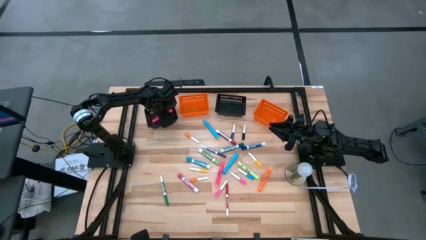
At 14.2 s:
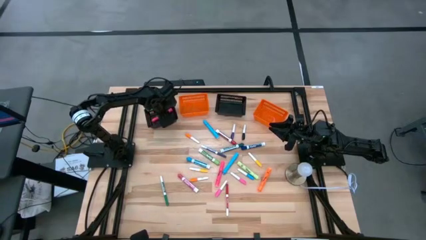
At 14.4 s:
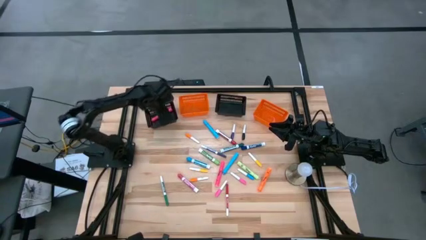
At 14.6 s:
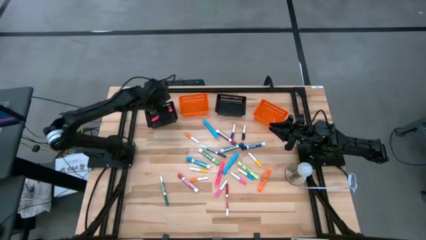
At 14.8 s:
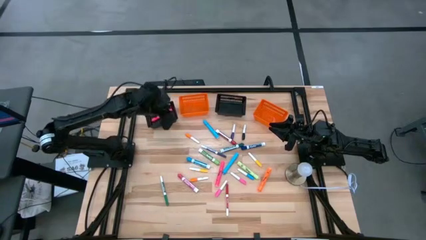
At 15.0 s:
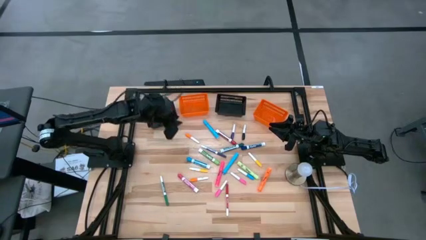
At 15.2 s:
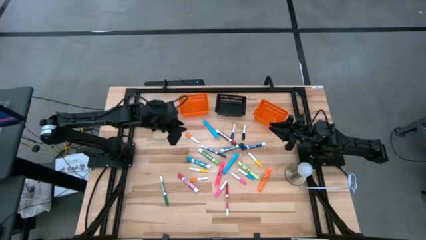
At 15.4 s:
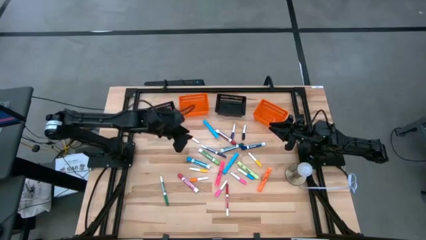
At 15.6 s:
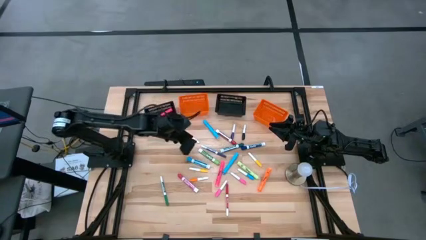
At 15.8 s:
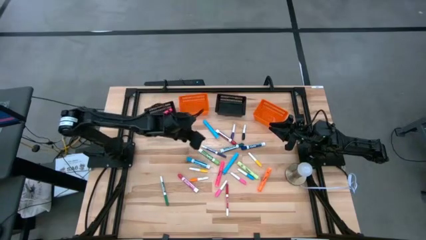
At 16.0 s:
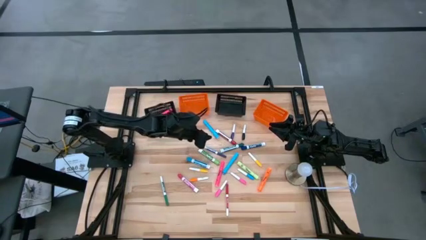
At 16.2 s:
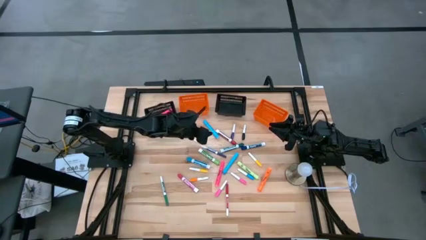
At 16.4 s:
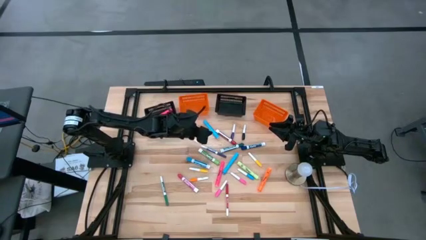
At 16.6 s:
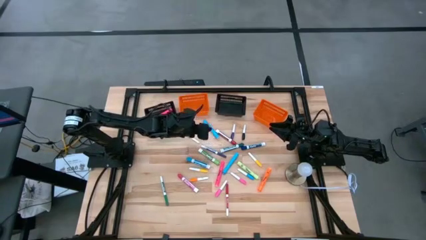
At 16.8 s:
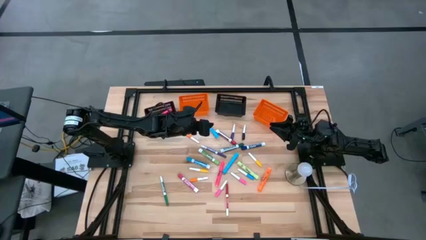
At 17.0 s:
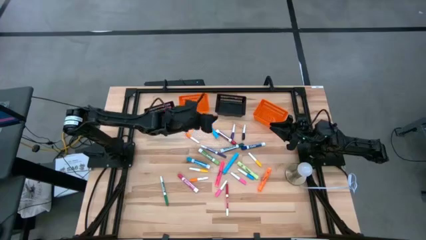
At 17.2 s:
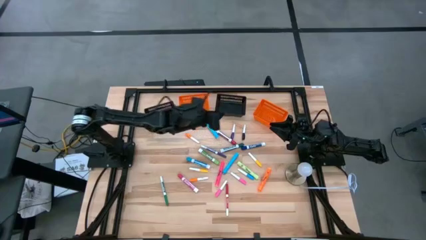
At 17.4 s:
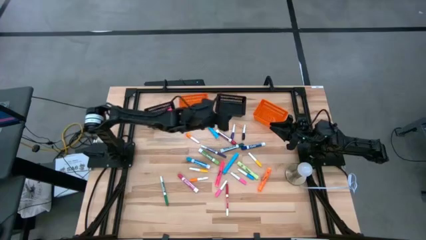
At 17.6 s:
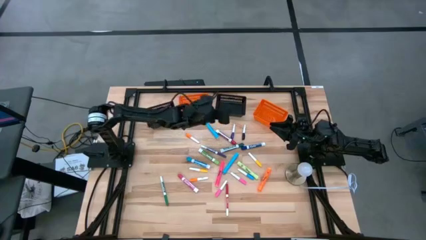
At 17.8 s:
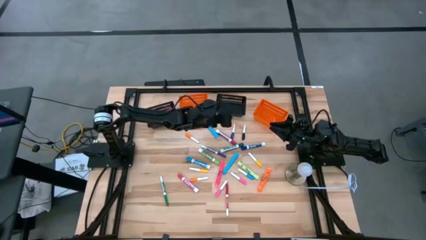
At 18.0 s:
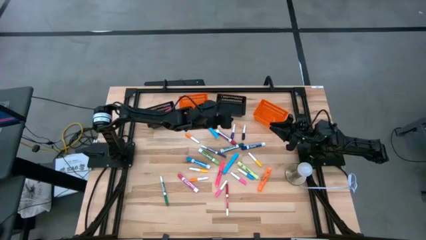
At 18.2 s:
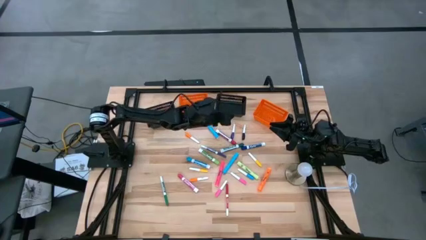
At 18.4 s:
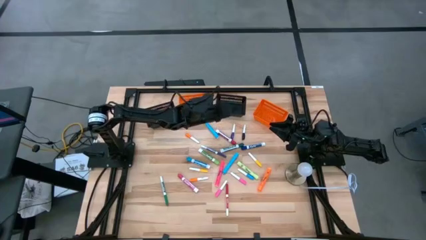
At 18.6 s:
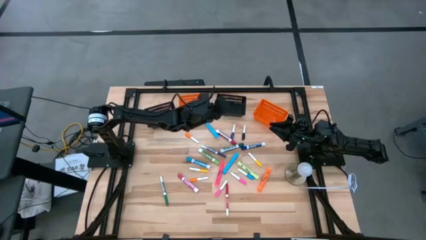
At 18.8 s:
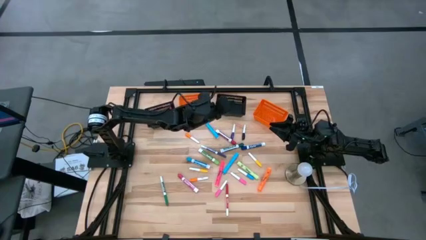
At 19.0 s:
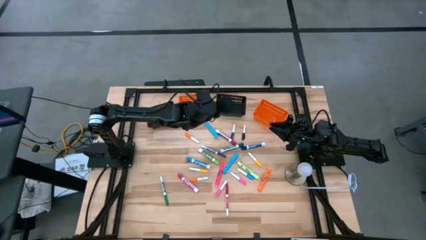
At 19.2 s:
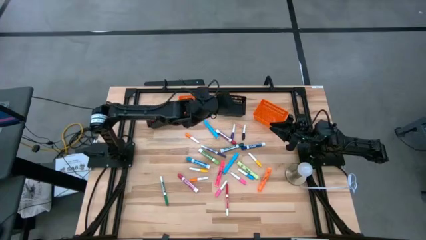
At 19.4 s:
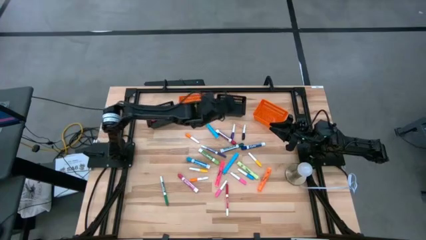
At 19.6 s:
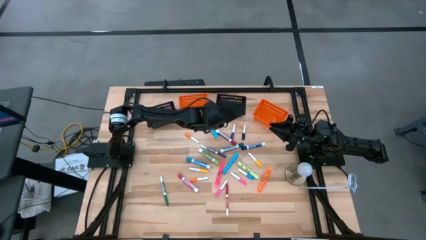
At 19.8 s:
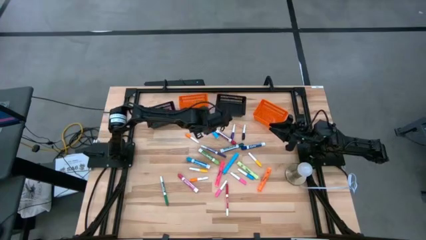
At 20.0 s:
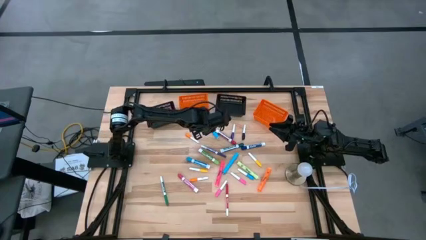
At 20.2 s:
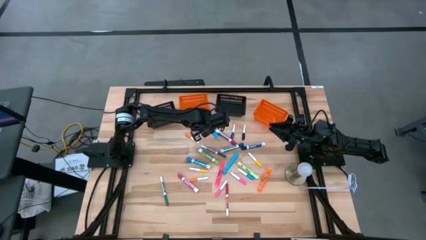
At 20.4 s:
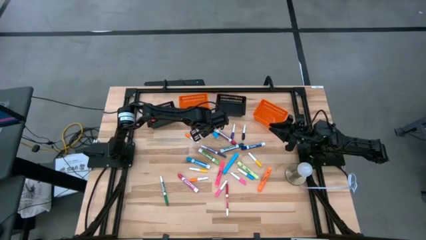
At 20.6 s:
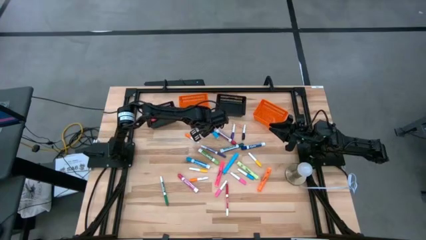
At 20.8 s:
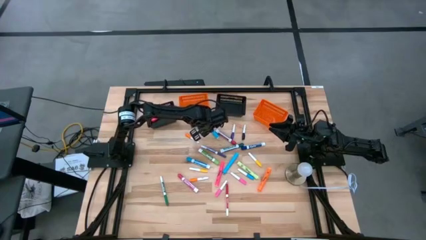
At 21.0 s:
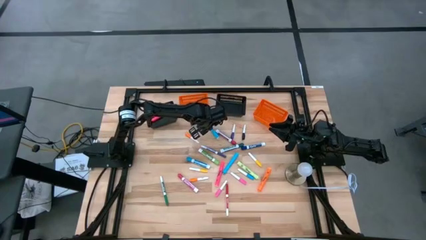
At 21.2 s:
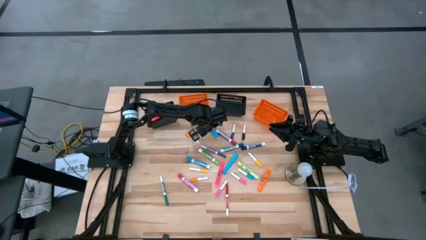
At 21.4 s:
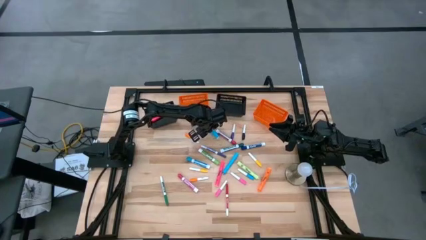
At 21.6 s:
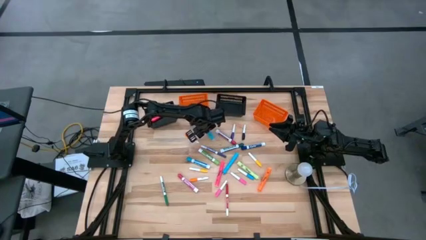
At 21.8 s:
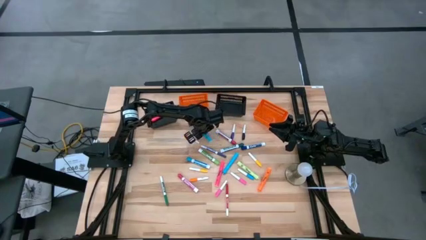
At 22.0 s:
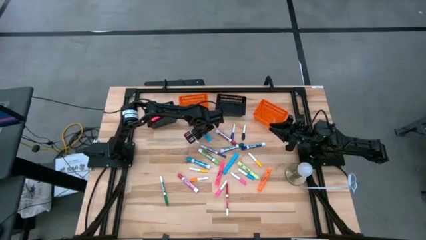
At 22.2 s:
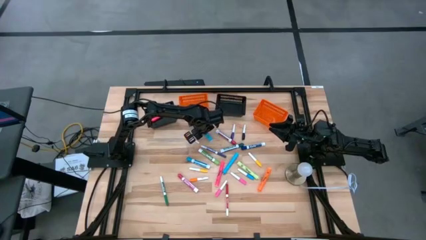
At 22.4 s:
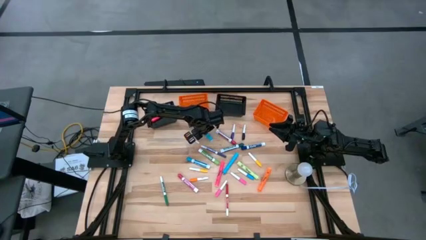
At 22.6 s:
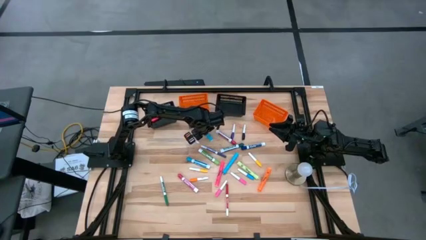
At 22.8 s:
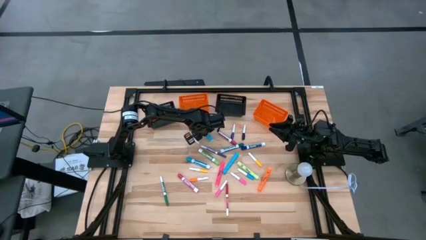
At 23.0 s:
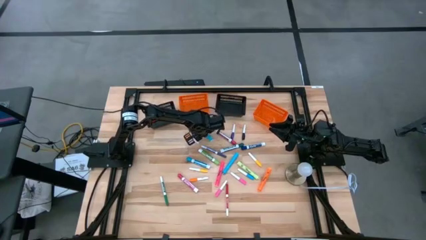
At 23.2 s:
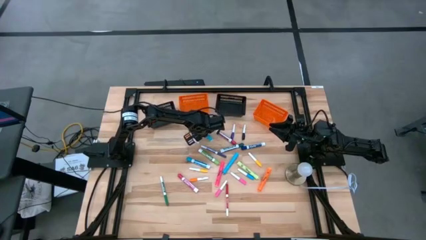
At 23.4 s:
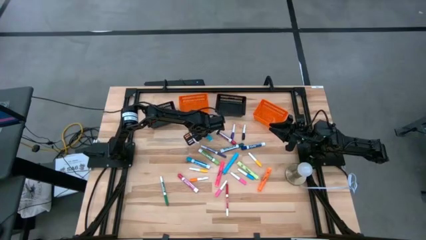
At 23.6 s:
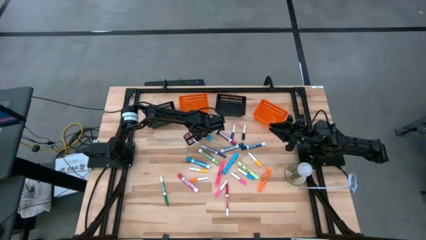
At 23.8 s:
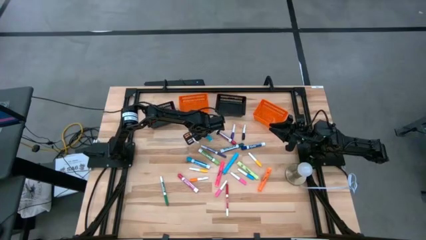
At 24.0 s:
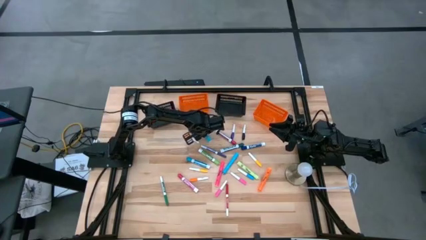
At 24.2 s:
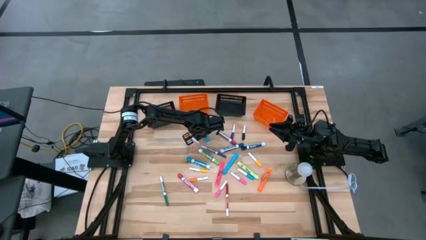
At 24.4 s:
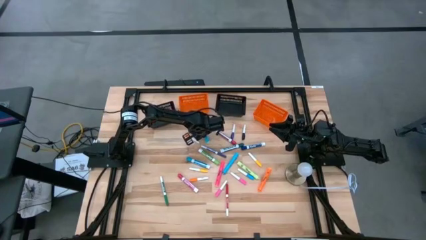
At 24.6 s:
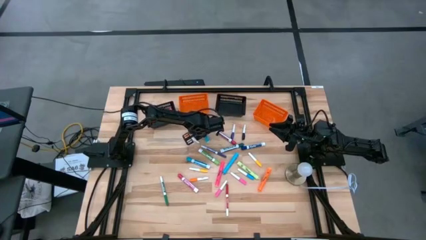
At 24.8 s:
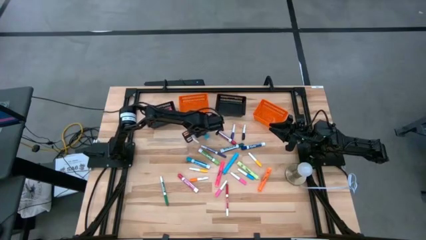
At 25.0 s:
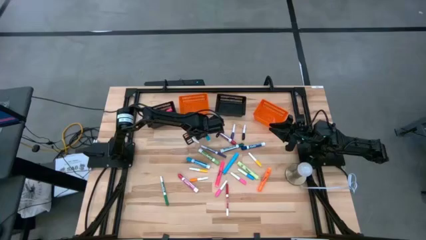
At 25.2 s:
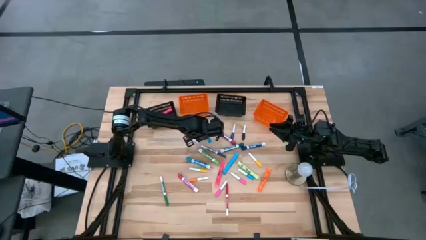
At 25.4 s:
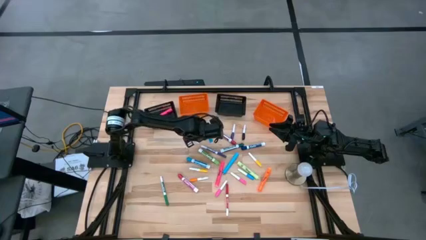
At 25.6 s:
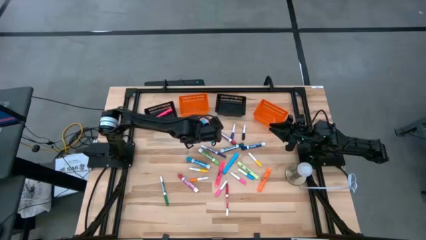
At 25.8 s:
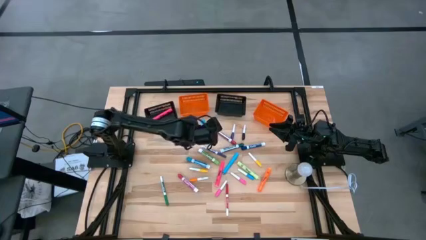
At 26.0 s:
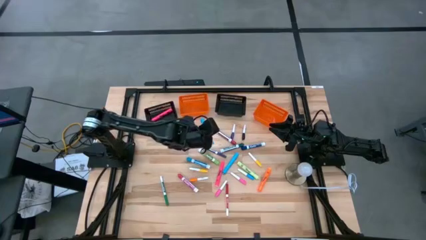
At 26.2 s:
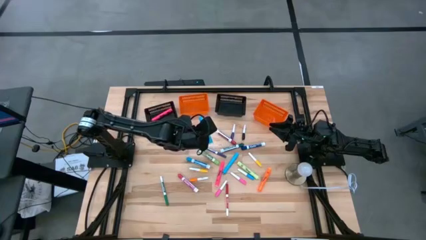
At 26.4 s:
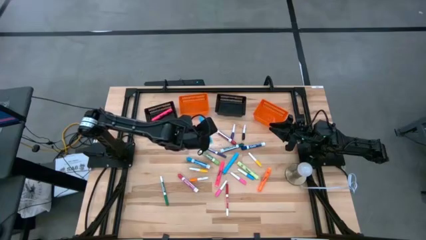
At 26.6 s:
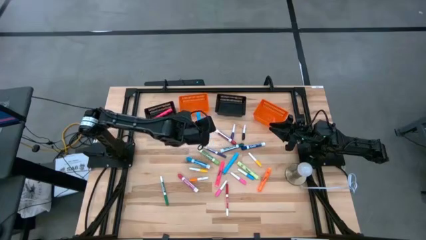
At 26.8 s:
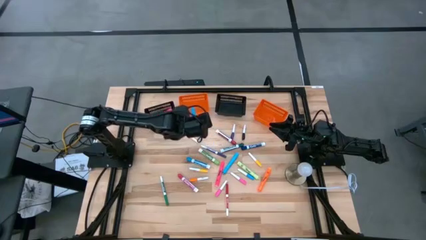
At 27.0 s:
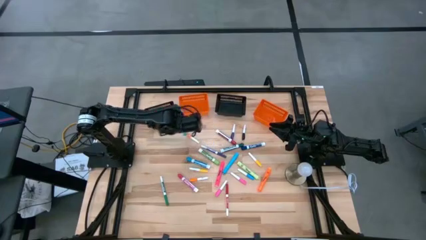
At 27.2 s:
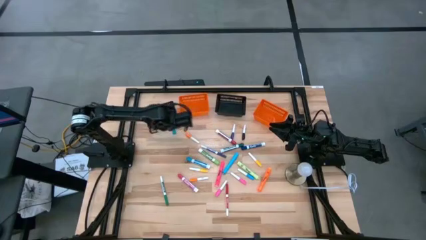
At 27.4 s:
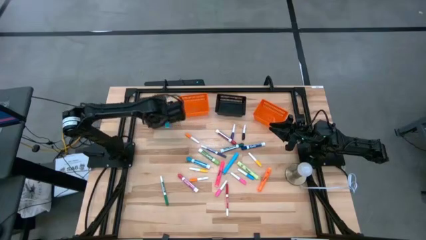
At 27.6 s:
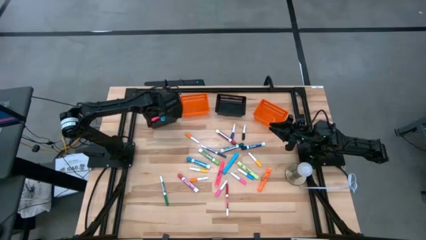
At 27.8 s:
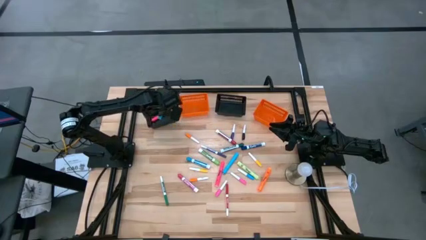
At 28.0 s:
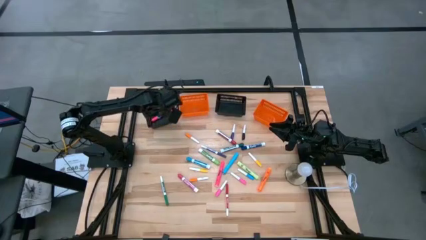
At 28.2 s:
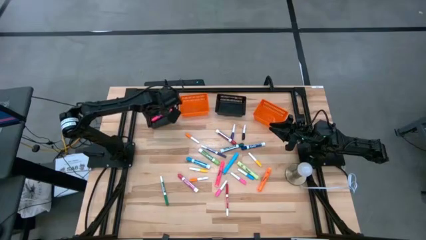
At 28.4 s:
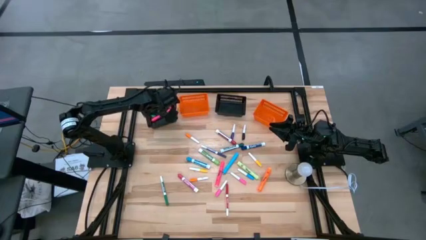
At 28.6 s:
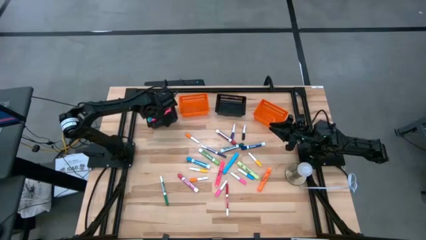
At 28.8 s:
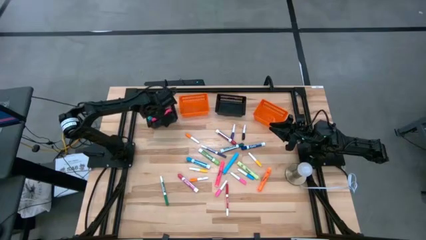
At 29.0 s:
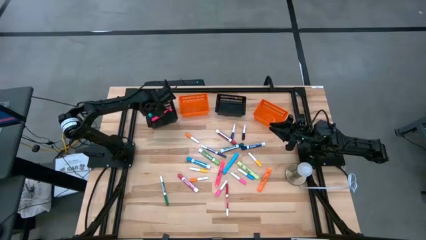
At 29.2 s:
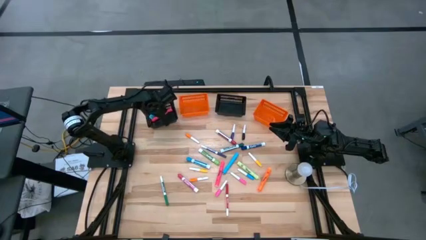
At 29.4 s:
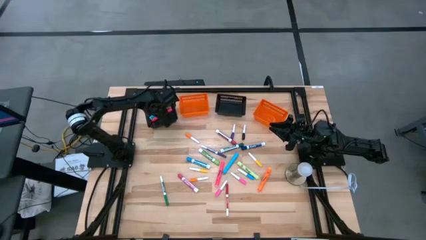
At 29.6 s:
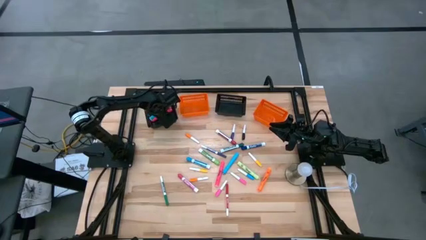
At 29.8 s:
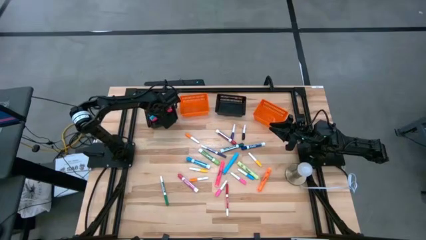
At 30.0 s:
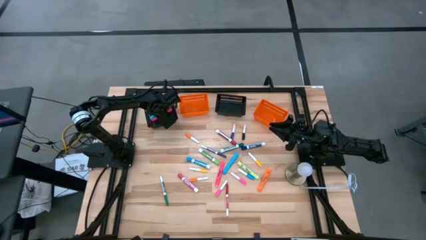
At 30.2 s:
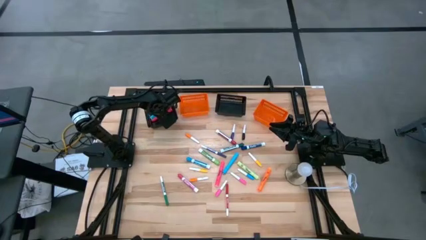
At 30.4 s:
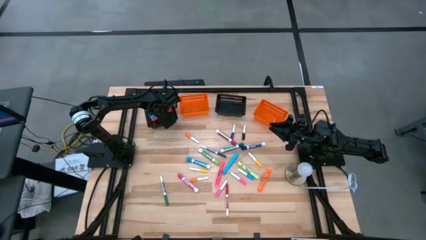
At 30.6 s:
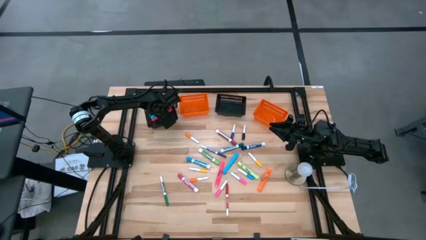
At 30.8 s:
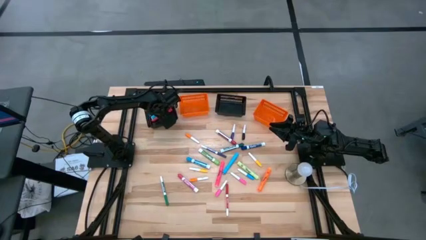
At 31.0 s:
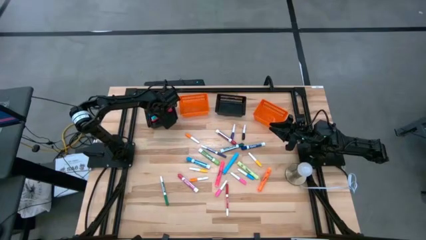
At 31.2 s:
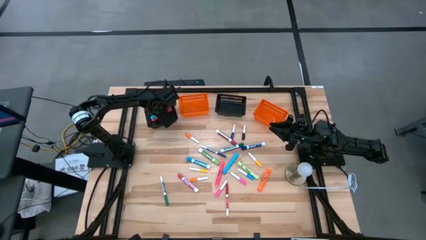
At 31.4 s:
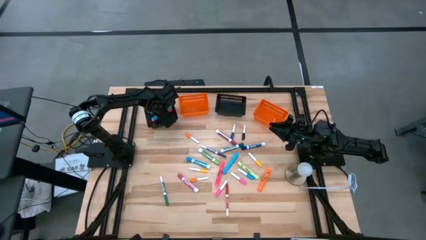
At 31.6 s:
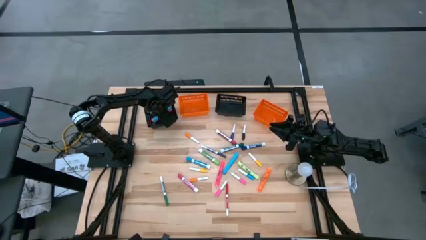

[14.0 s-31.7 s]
Task: Pick & Place Markers
Put the top blue highlighter pen into the left black bin
